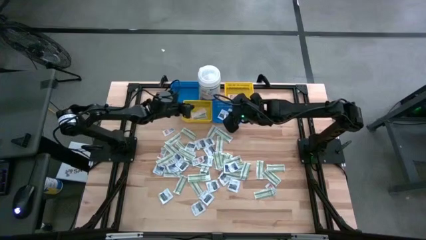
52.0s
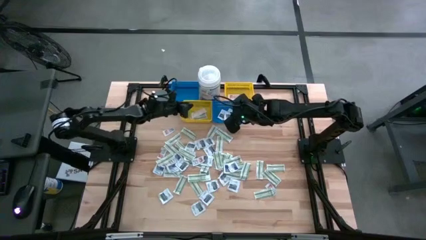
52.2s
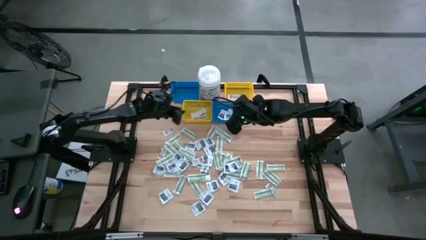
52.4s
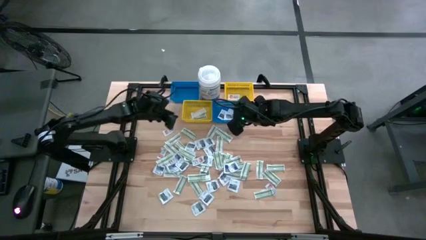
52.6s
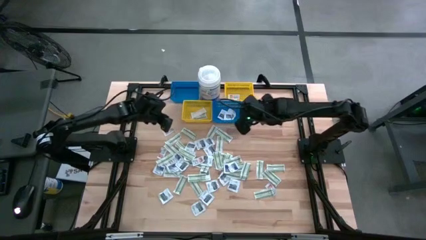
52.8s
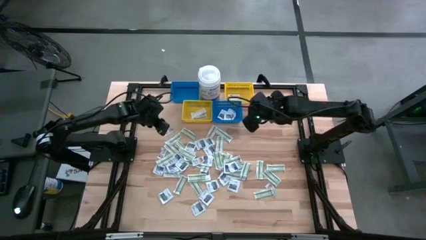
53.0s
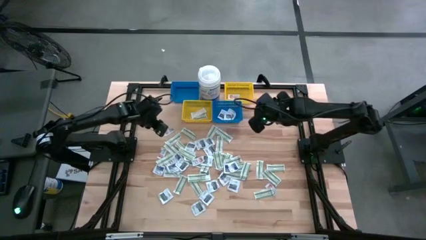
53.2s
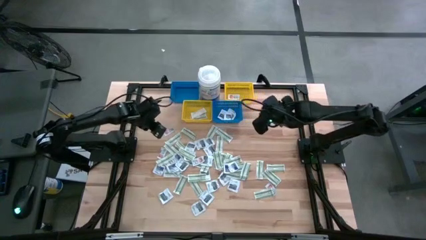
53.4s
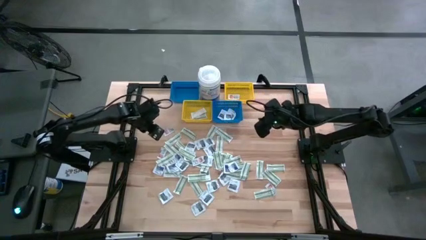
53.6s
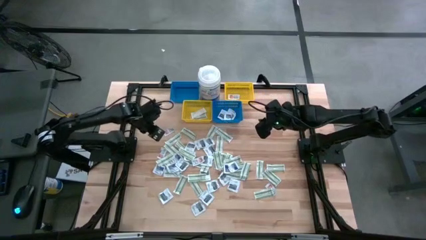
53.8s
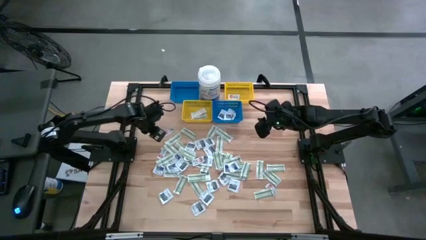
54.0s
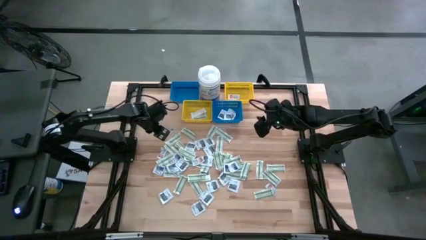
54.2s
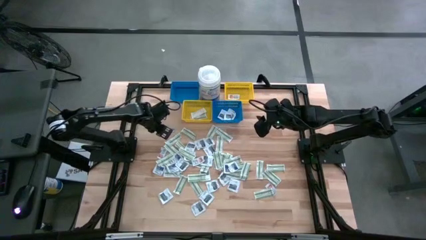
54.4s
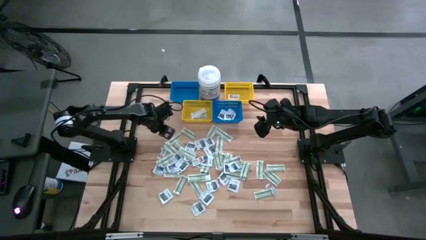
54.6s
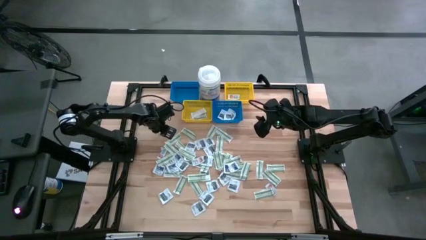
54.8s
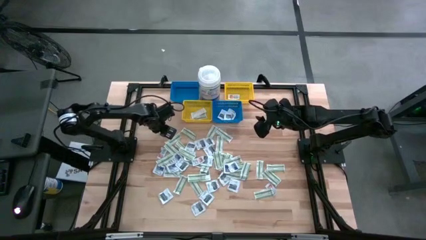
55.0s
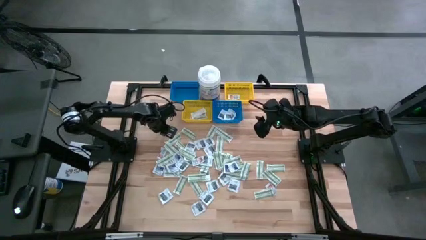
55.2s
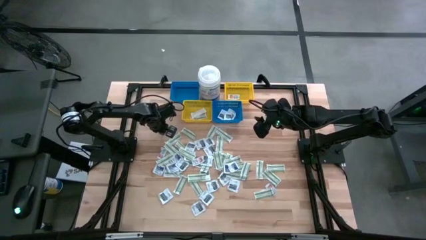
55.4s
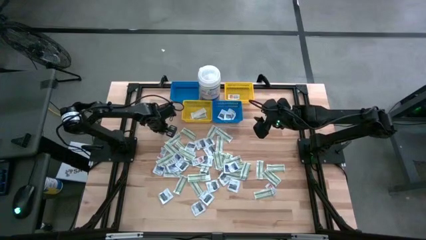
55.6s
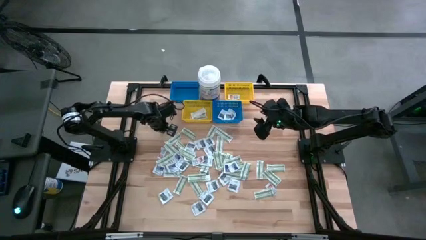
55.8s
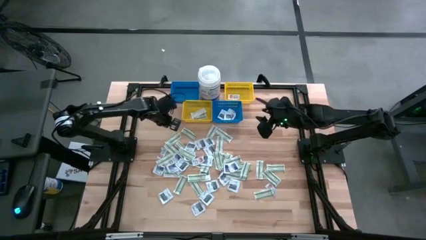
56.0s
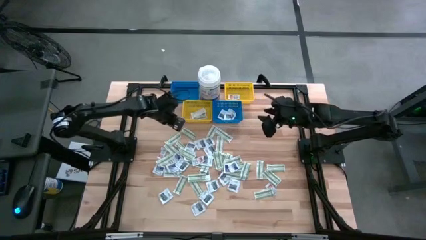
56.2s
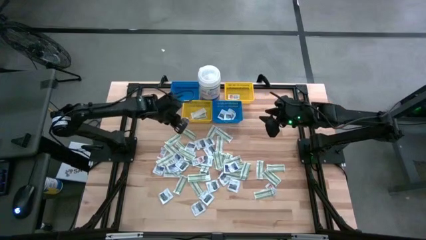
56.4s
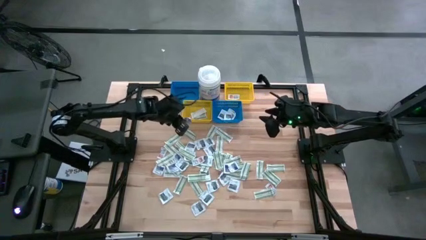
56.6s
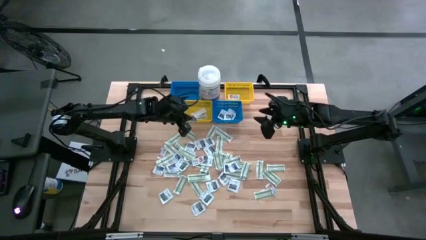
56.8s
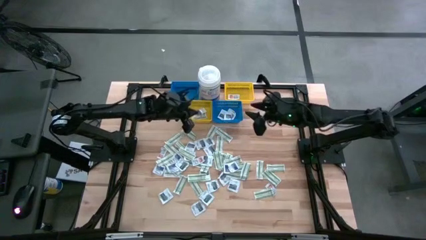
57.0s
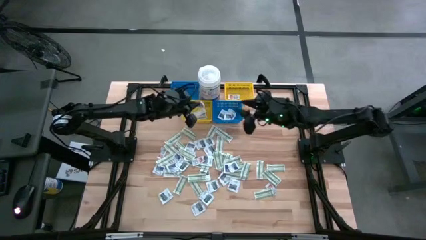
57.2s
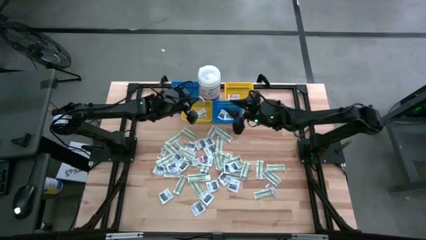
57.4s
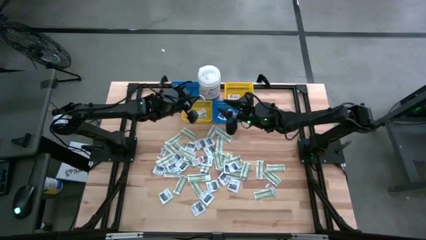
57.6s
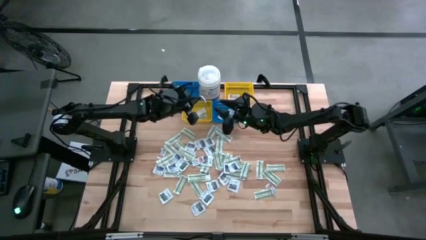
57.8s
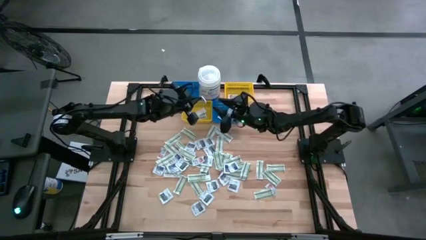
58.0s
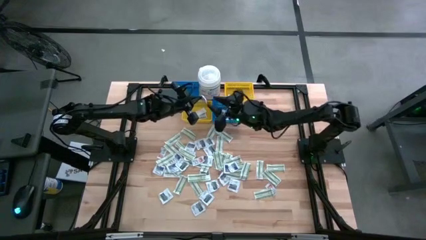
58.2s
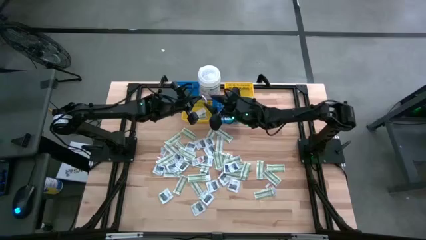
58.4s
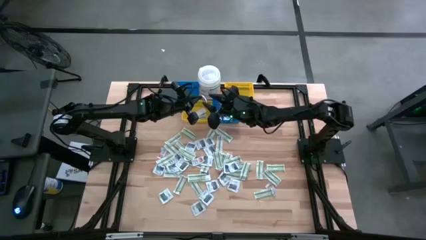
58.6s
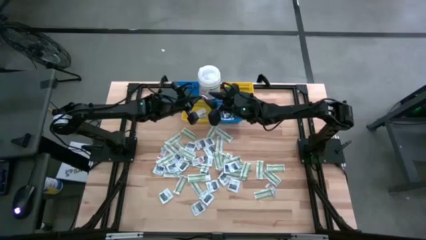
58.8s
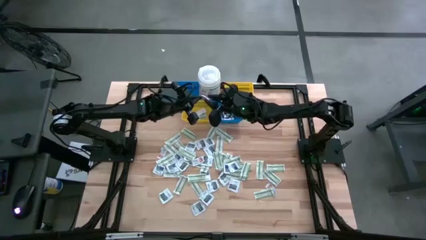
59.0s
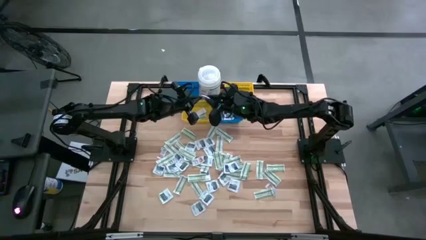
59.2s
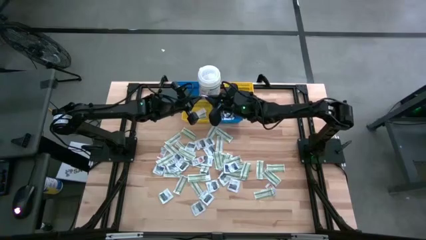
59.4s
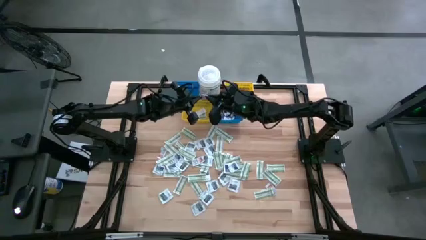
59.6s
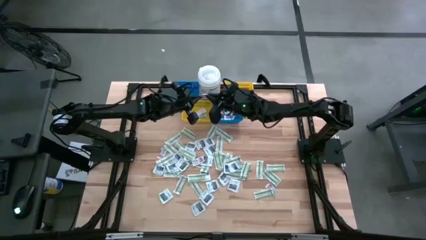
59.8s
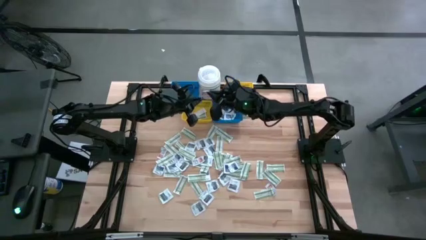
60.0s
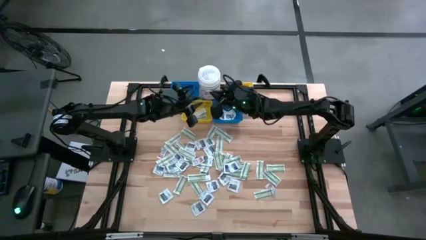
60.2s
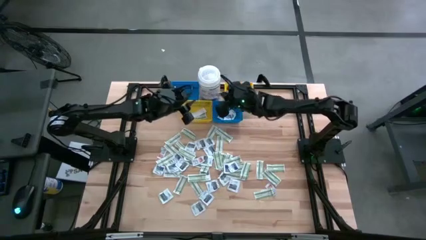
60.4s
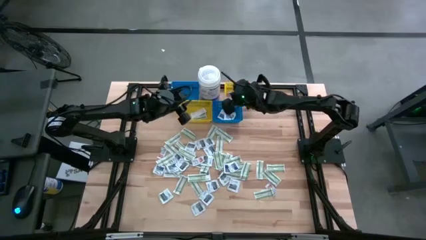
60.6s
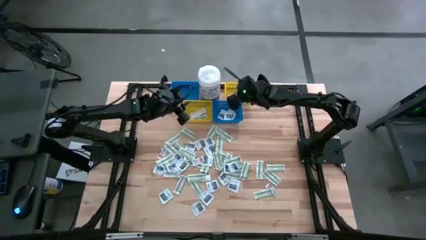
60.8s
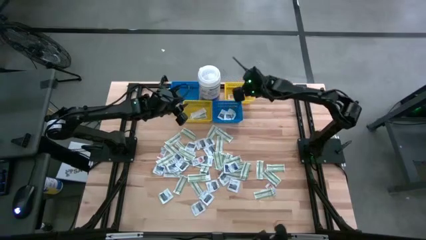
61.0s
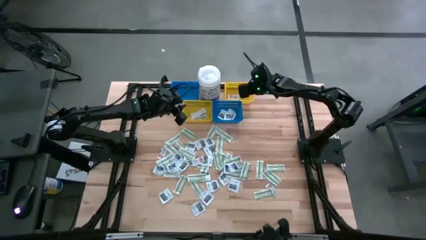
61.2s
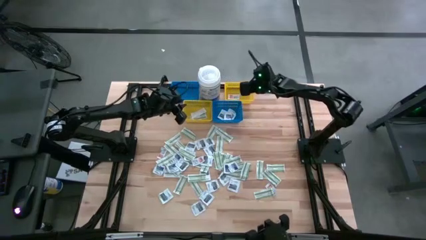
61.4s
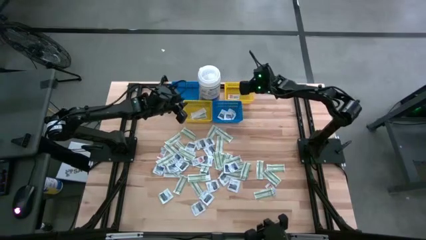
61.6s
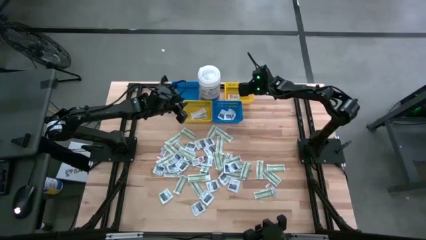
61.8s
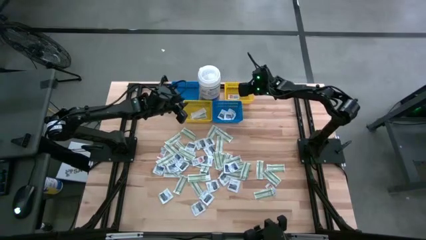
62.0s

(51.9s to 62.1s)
Task: Pick & Place First Aid Supplies
Put the orange ointment pack into the right yellow bin

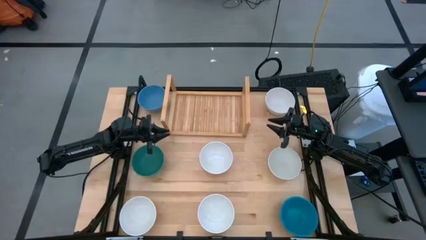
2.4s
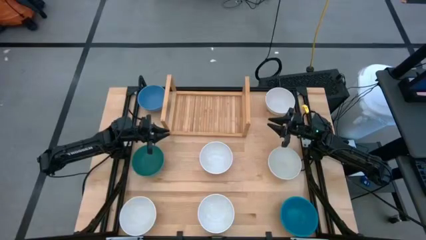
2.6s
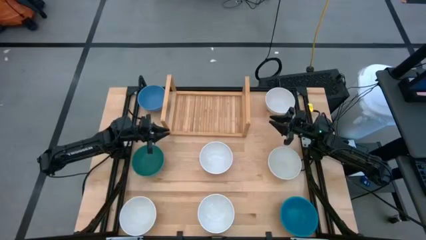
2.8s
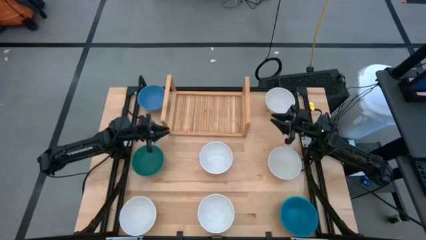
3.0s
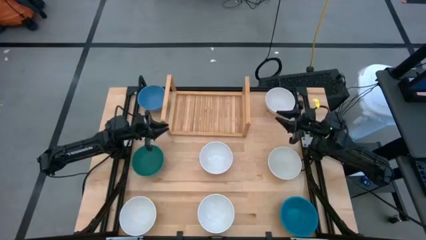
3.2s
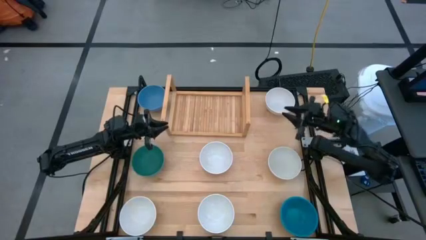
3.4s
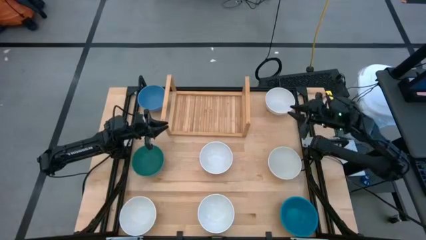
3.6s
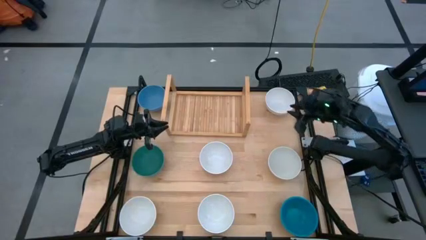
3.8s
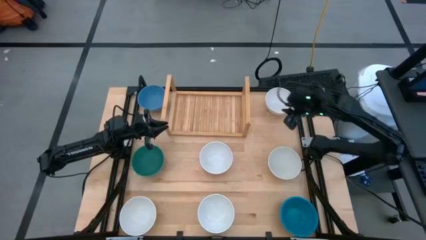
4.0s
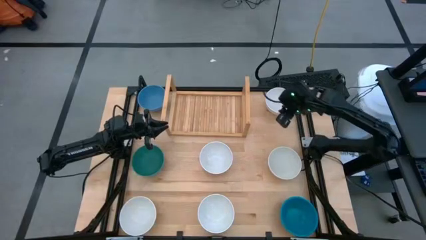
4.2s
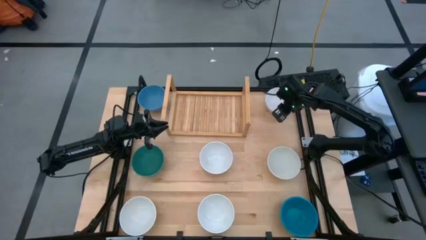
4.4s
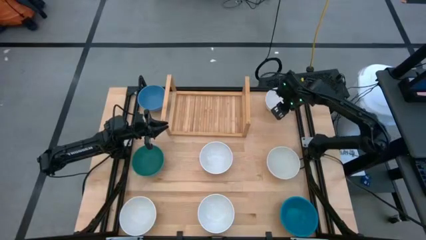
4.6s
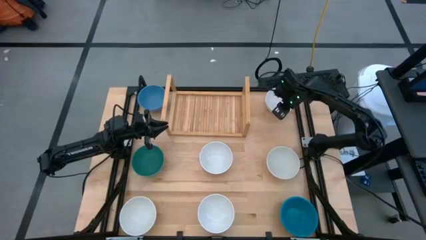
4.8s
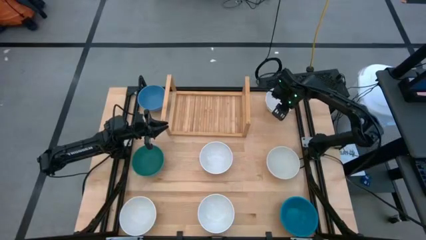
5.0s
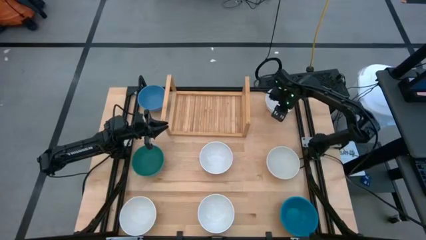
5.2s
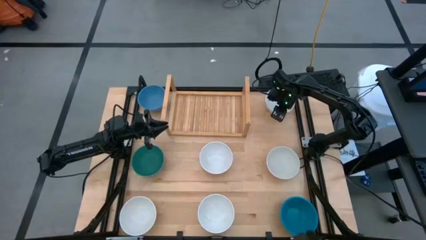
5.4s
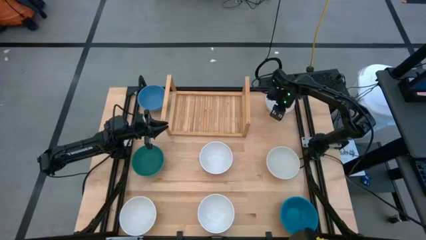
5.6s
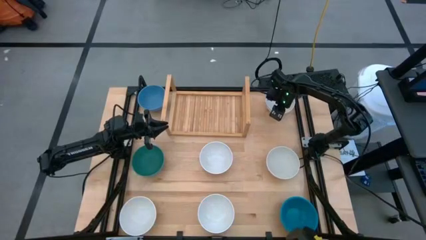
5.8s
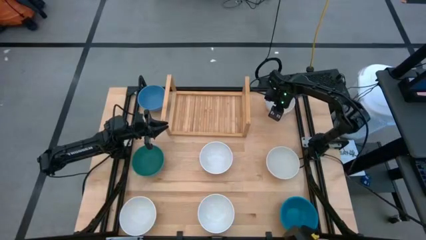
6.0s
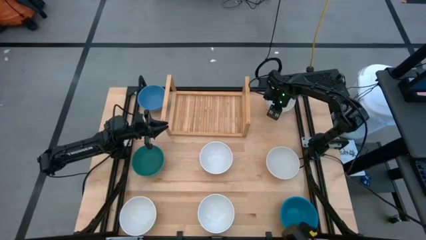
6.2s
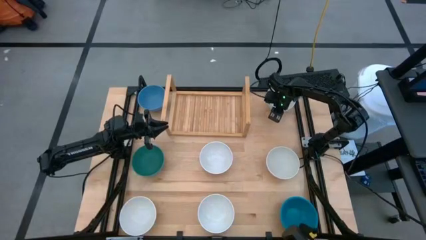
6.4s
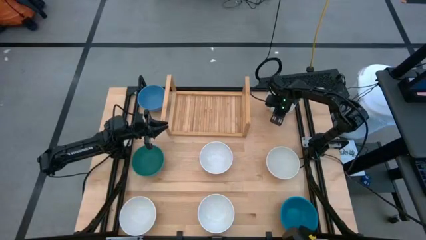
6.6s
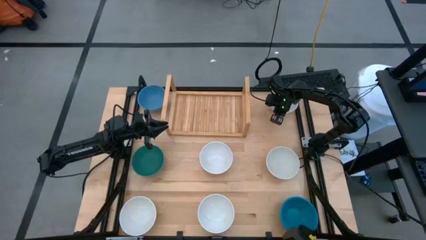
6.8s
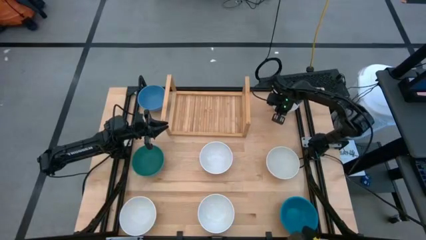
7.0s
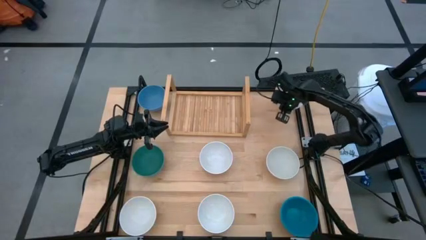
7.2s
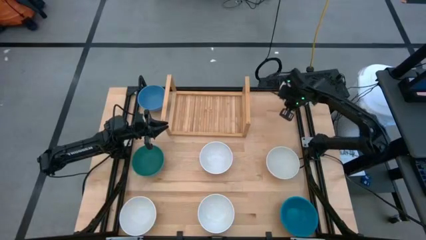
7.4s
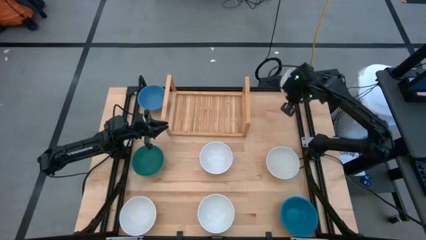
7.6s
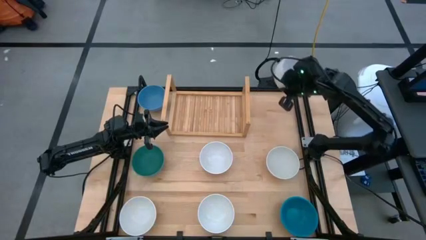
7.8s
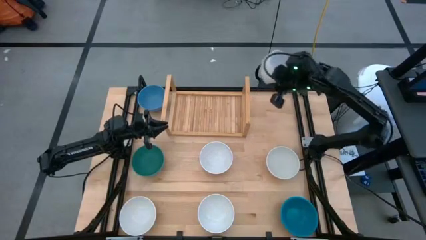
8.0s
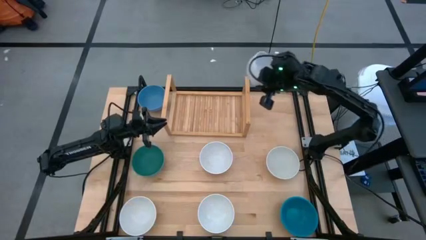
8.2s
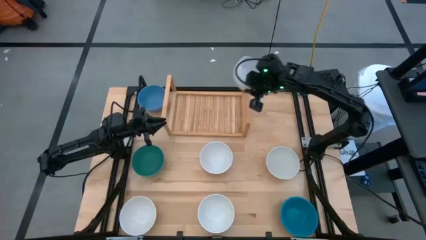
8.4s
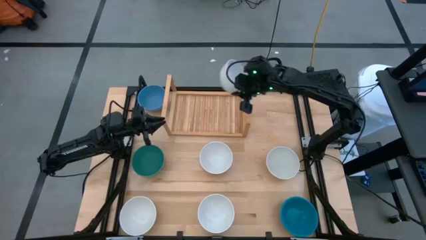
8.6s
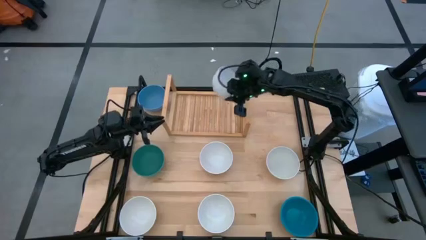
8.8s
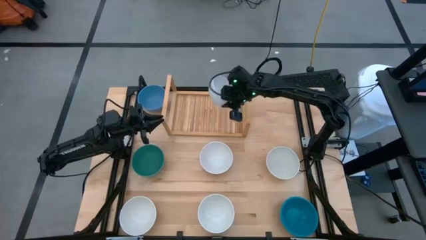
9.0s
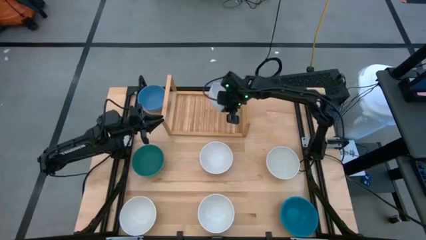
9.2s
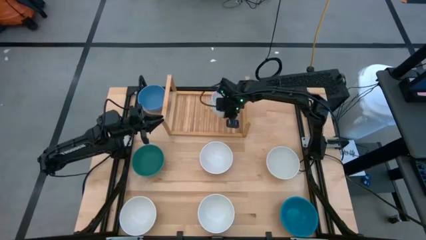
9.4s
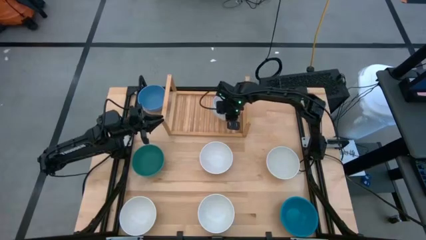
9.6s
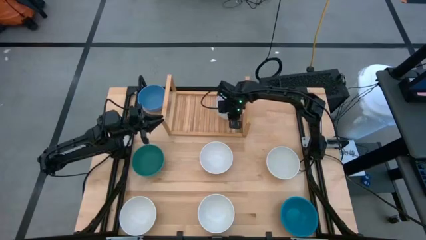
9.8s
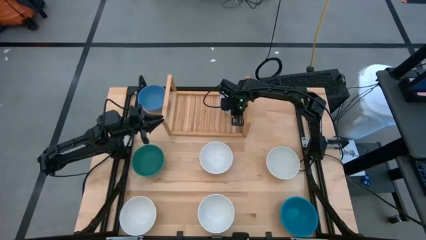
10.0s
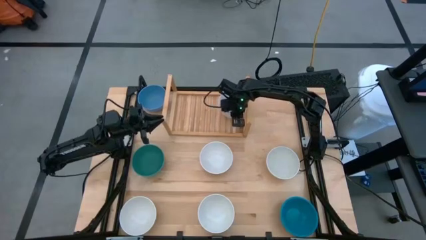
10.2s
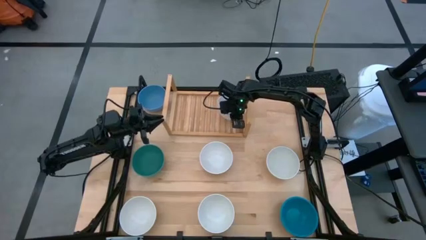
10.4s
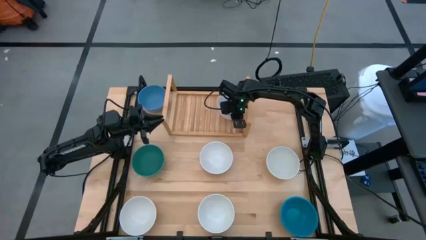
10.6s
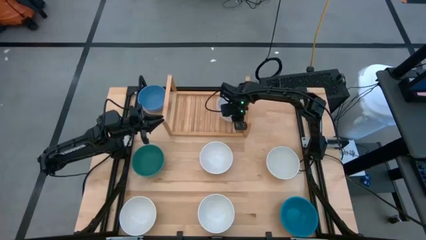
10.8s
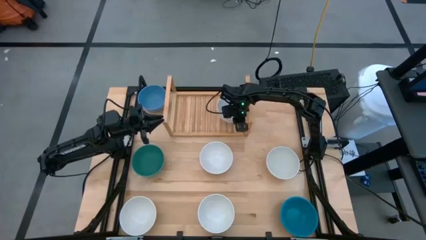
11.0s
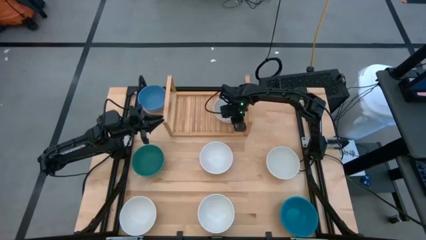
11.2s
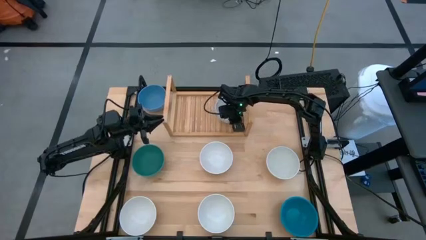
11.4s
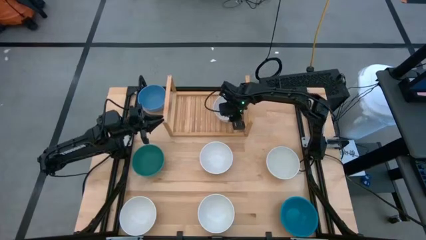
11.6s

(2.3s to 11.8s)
Task: Place and stack bowls onto a shelf
Put the white bowl on the shelf
